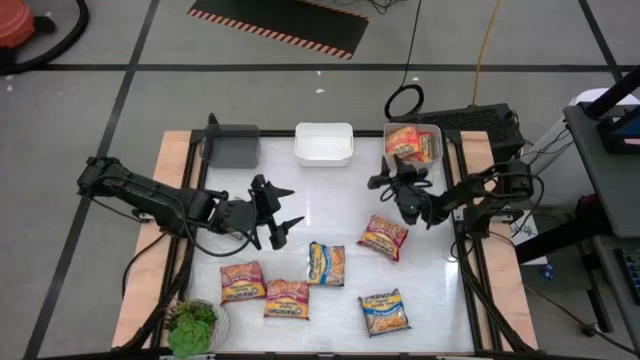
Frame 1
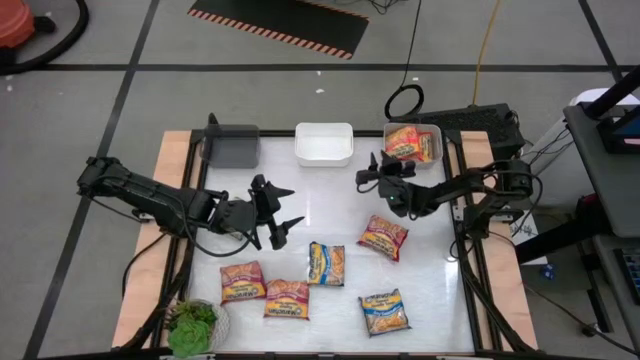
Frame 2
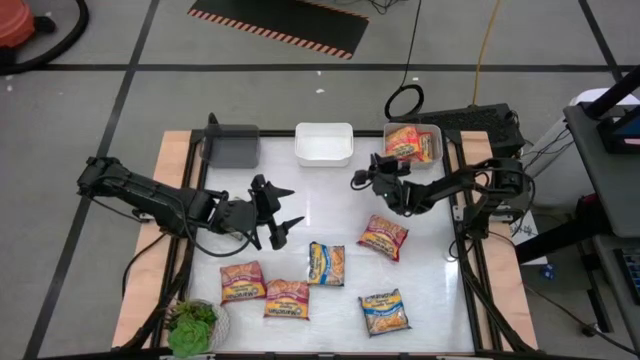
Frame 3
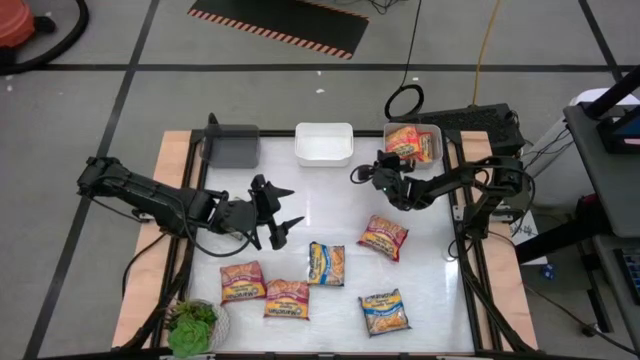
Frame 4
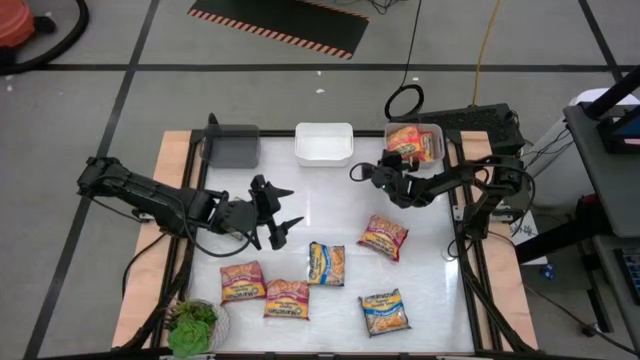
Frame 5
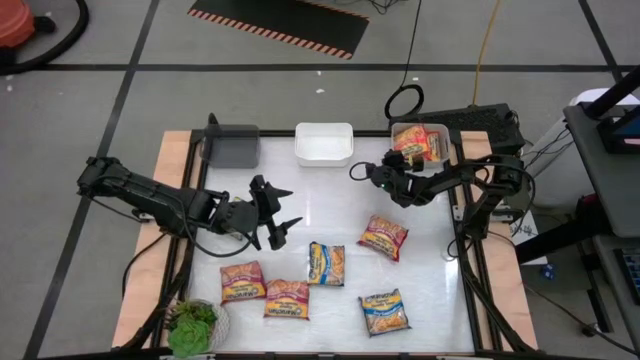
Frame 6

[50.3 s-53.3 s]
Task: Sort Maruchan noodles
Adjust the gray bin on the table

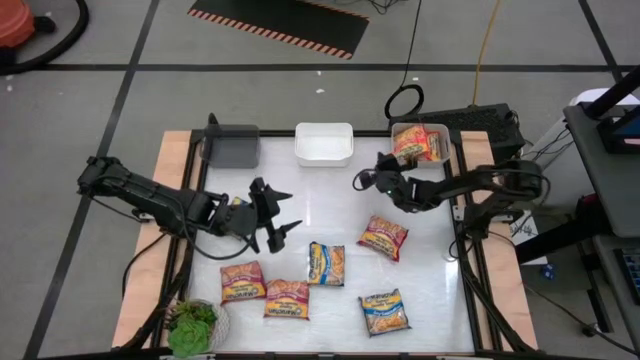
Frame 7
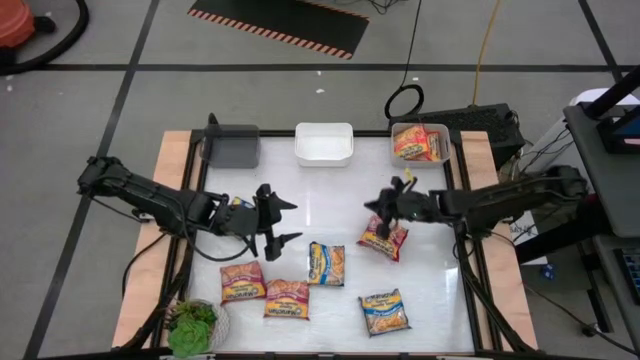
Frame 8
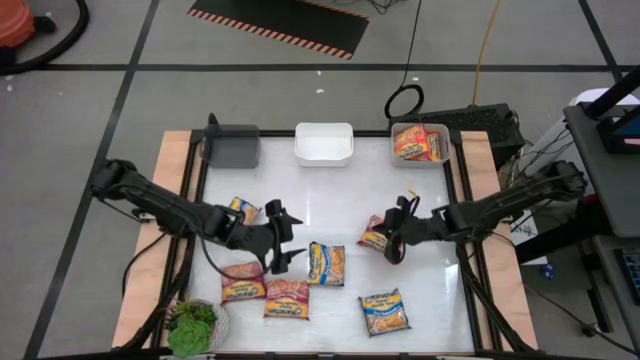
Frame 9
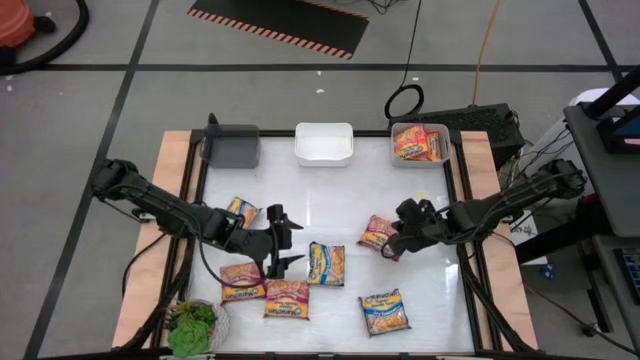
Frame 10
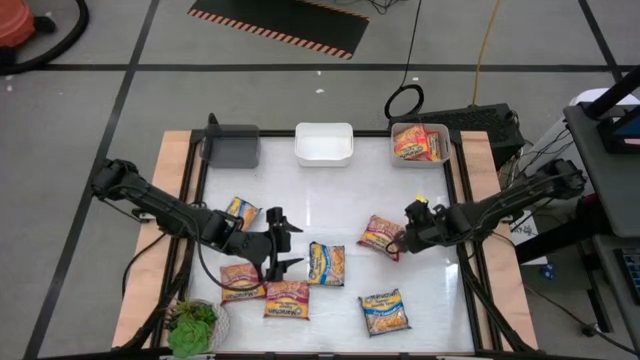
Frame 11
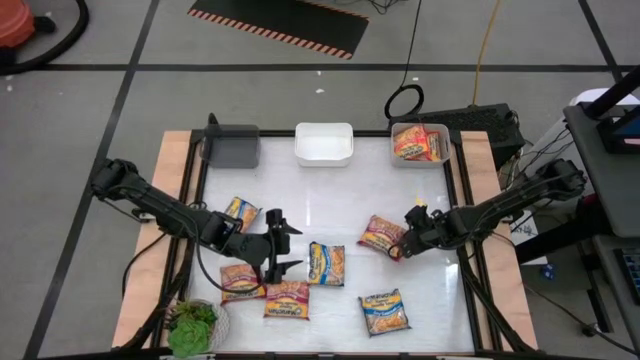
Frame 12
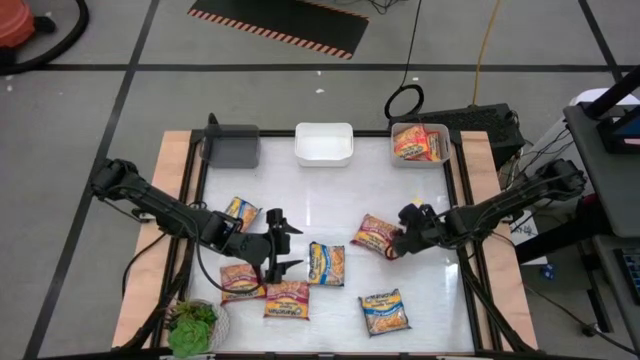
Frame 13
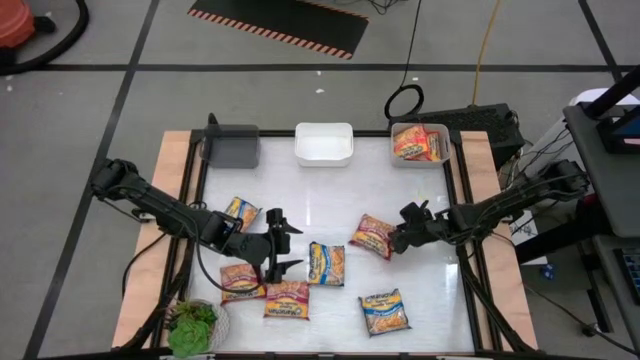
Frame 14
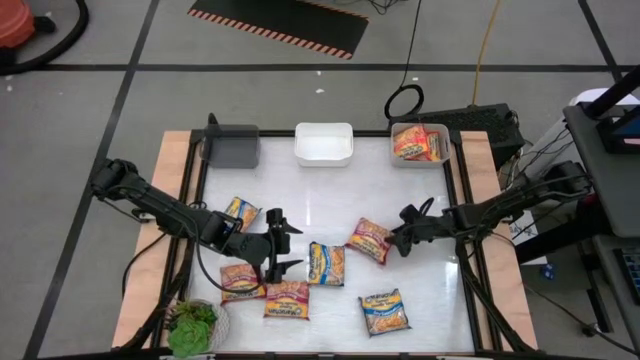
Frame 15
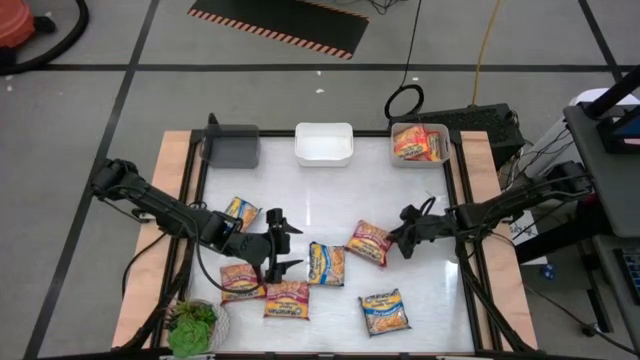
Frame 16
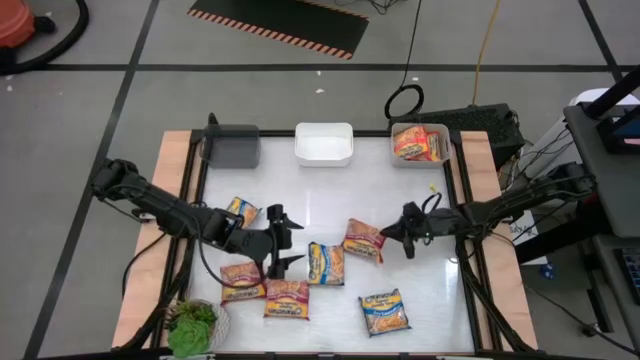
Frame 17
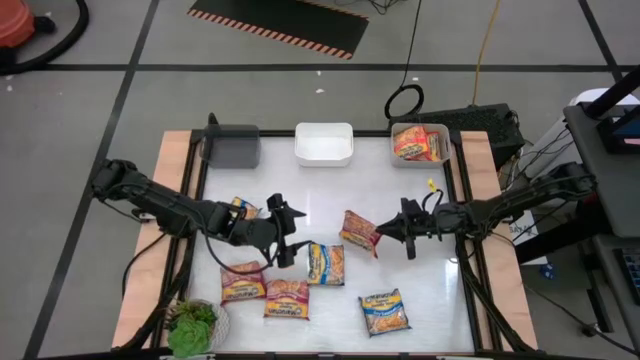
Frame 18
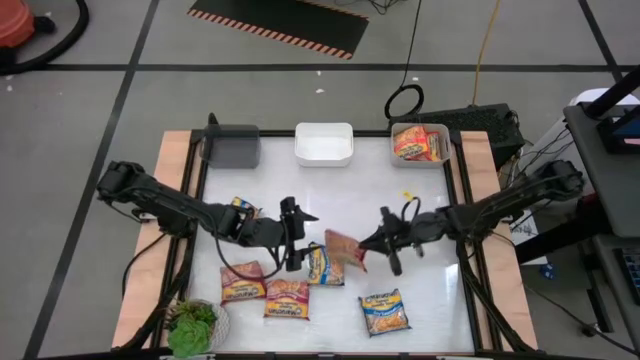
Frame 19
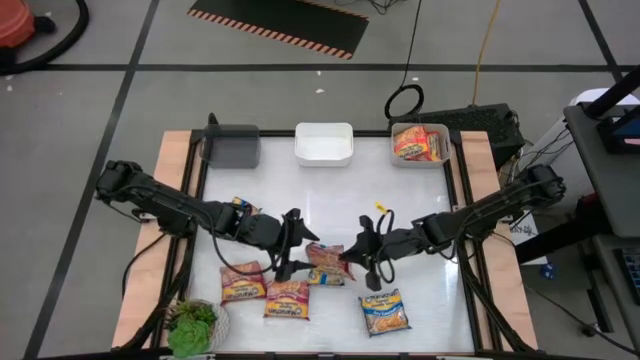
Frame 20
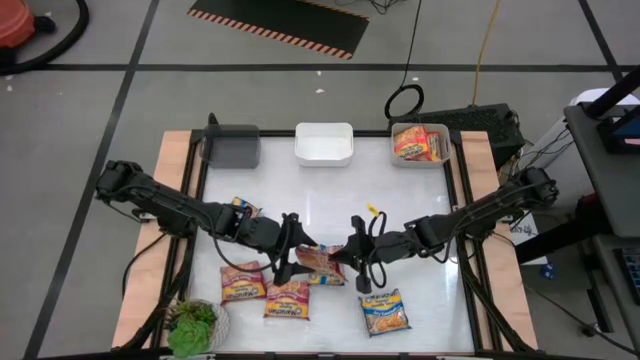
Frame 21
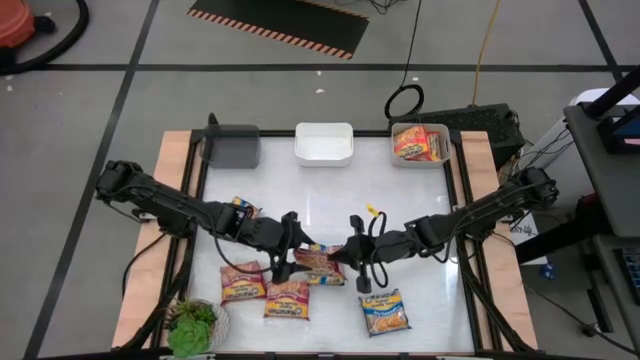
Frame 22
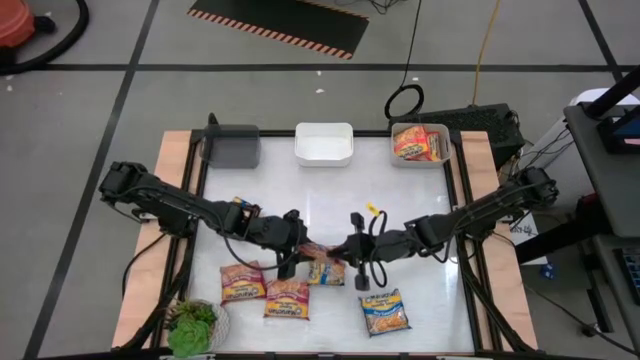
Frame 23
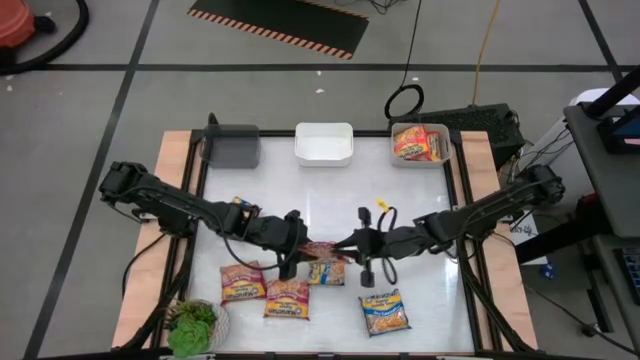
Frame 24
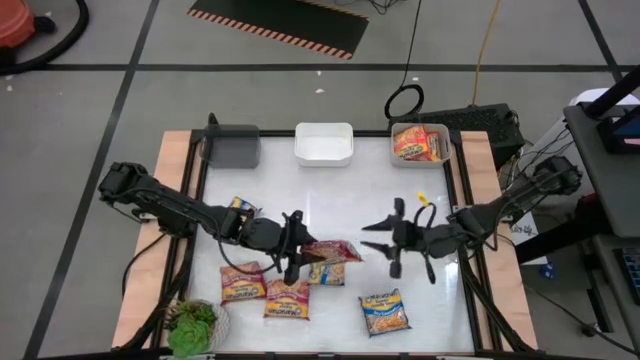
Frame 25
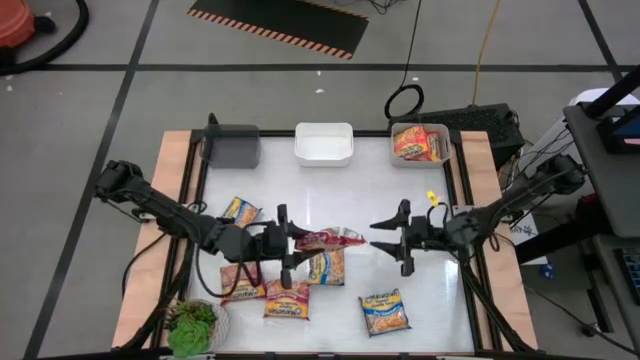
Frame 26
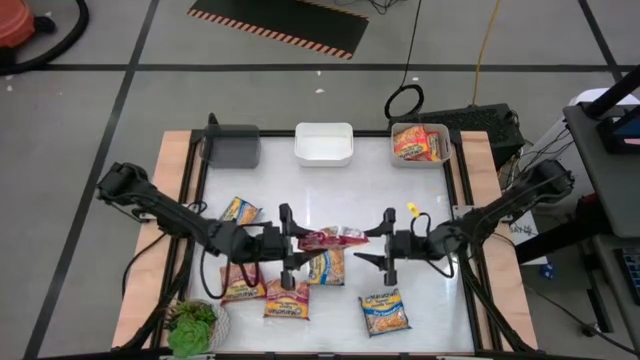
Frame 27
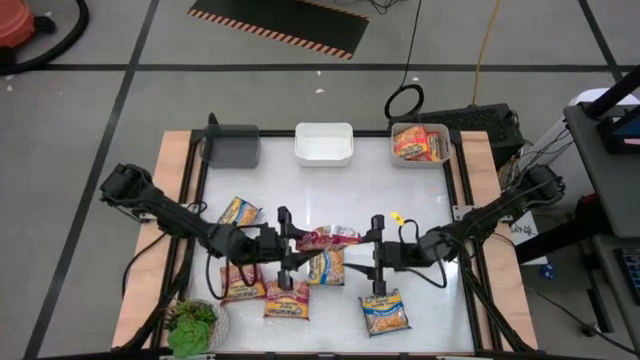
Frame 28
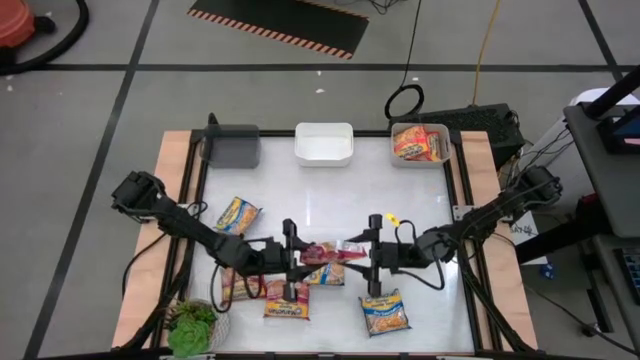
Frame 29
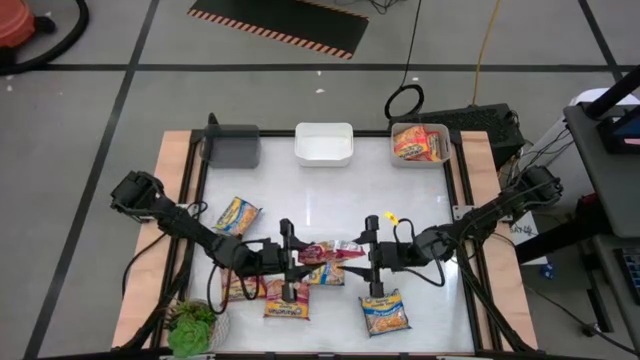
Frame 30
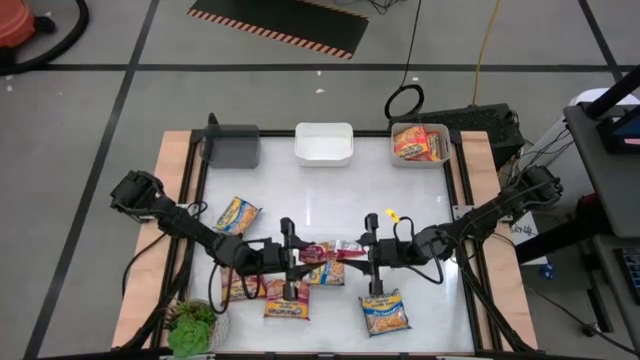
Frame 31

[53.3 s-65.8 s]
Put the top red noodle pack into the white bin

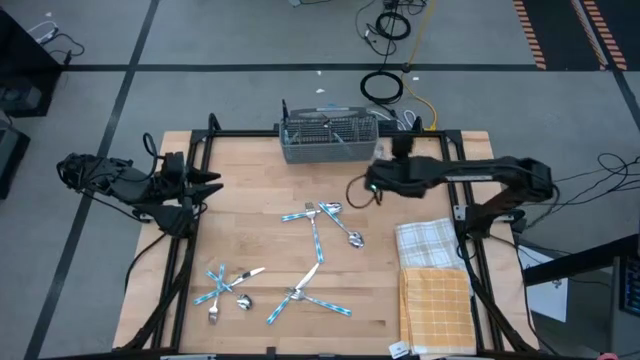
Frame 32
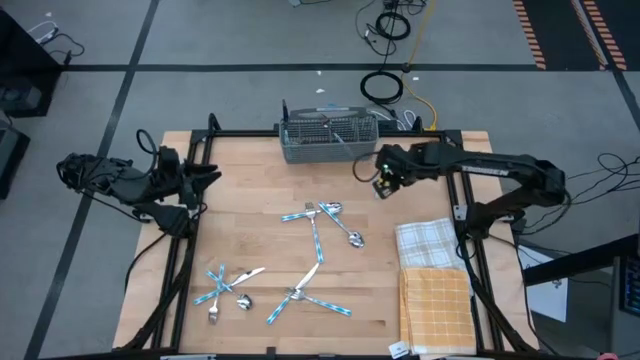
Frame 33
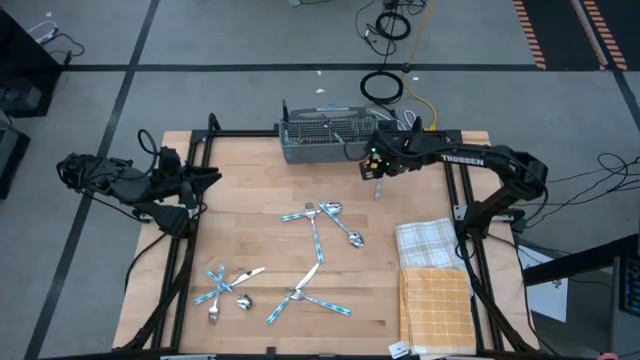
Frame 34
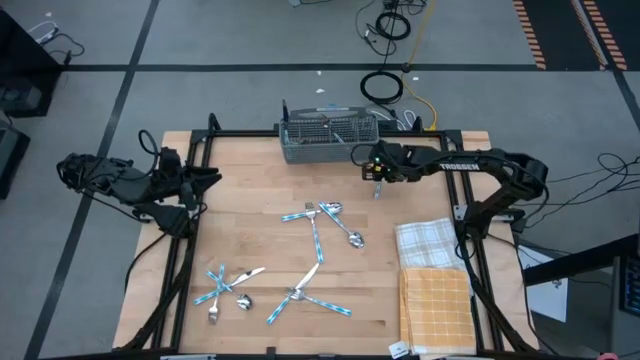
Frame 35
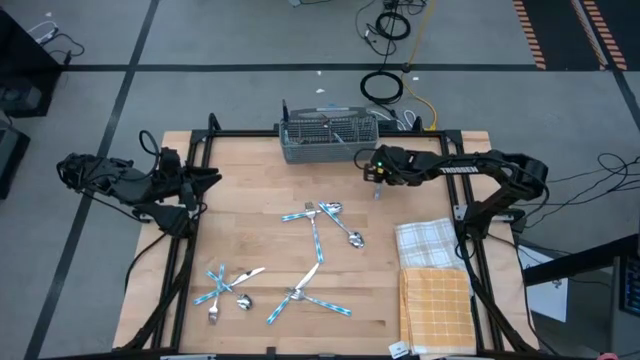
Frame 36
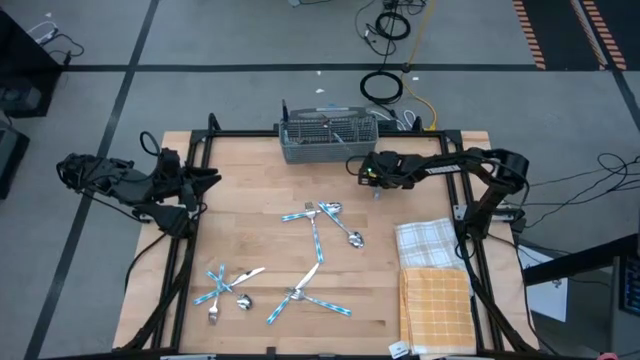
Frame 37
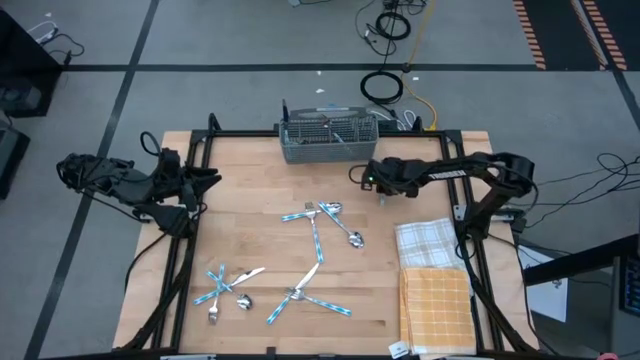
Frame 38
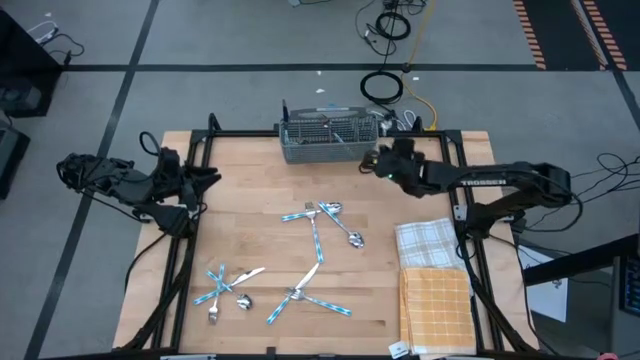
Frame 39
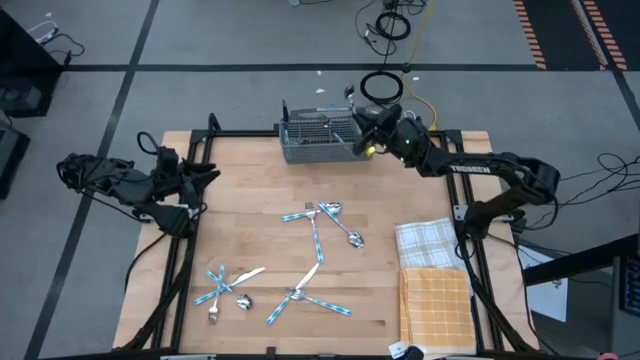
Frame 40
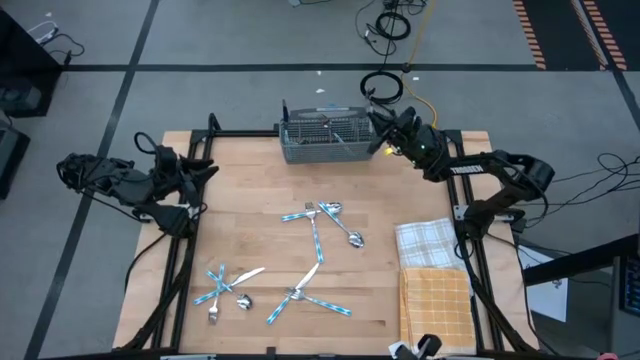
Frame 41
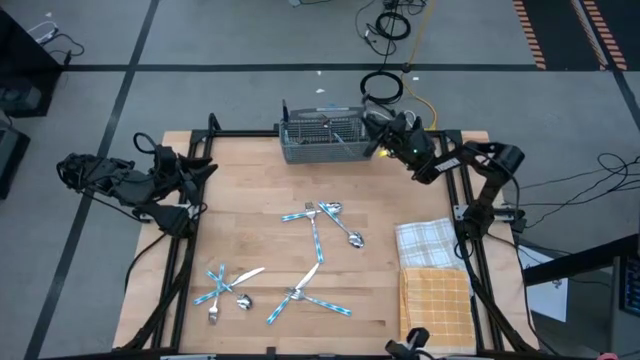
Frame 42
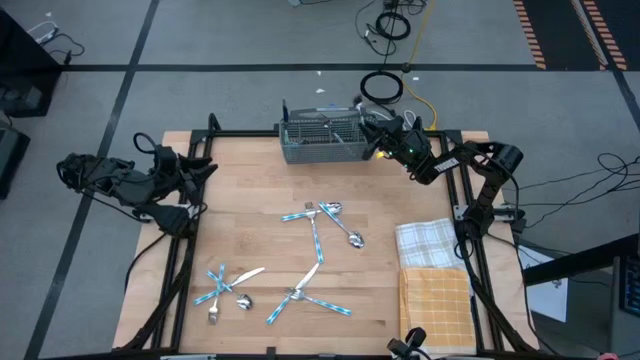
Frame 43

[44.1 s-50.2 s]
Task: Sort silverware
Put the spoon into the silverware rack
